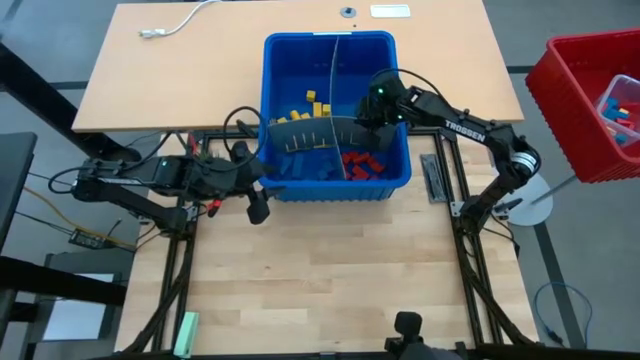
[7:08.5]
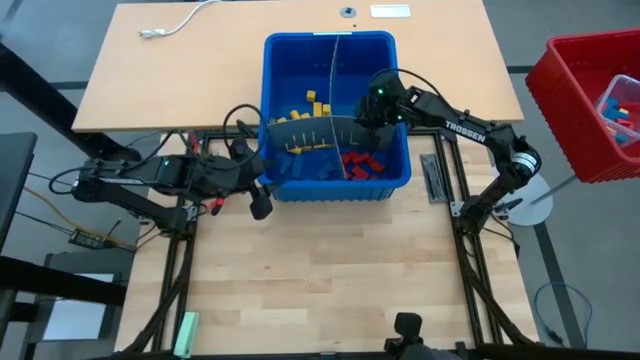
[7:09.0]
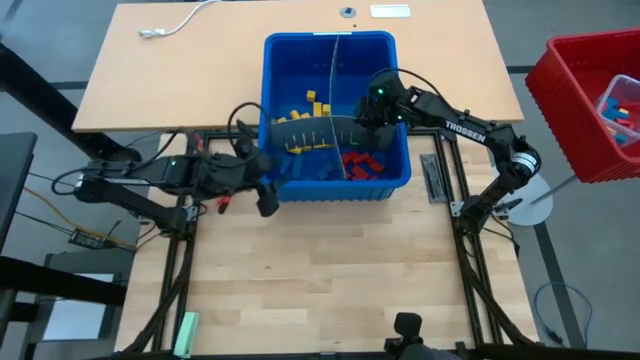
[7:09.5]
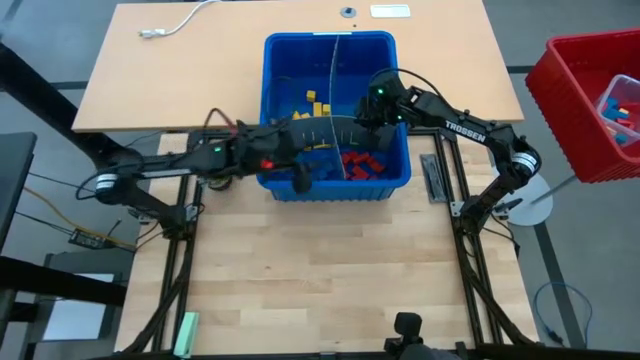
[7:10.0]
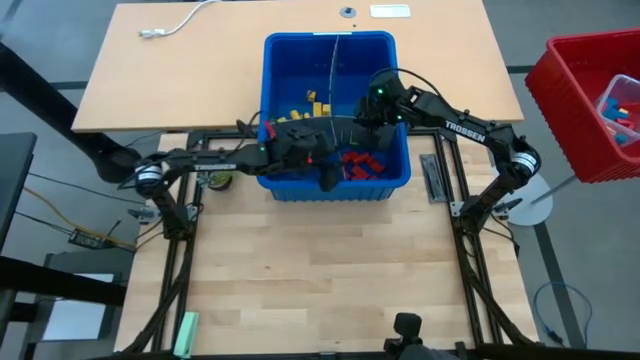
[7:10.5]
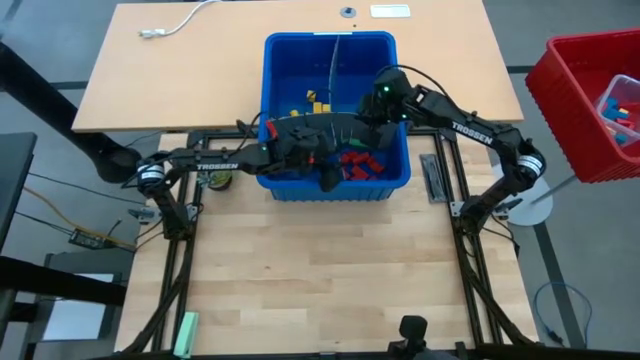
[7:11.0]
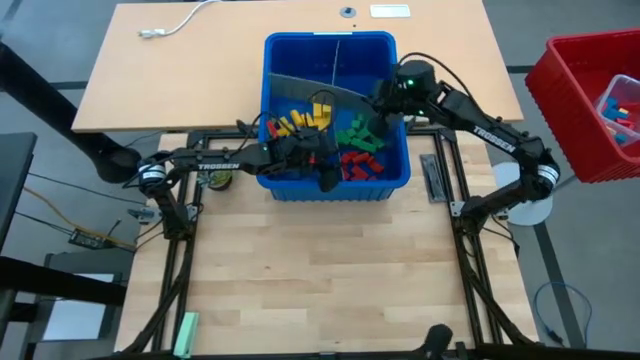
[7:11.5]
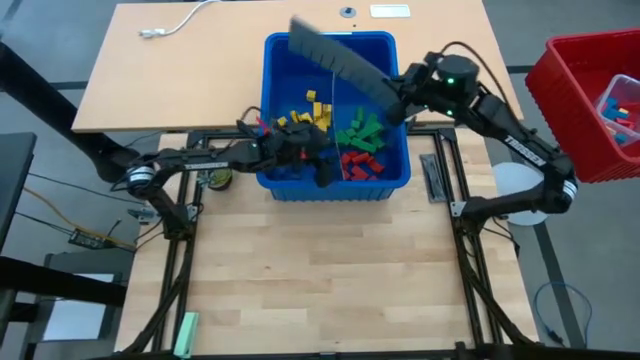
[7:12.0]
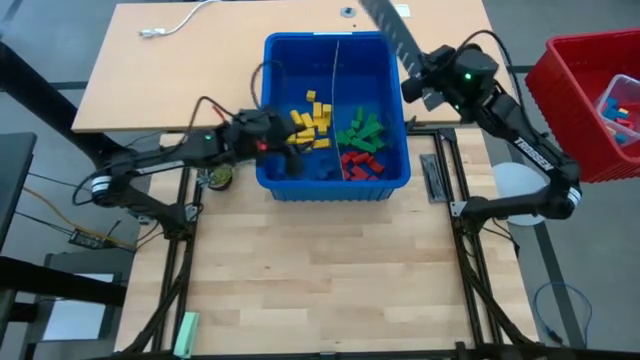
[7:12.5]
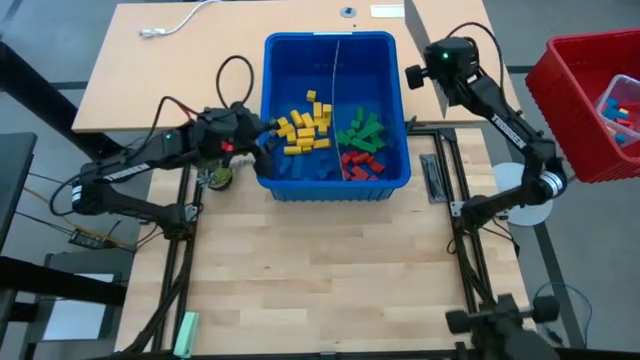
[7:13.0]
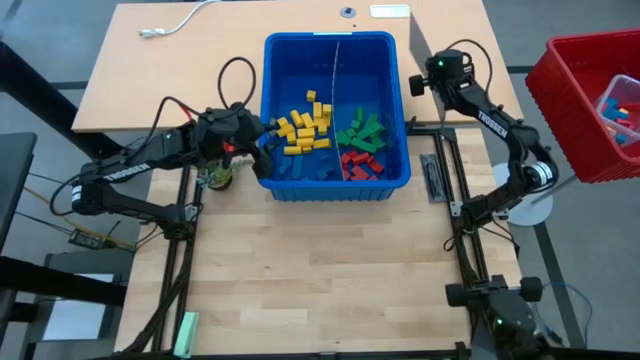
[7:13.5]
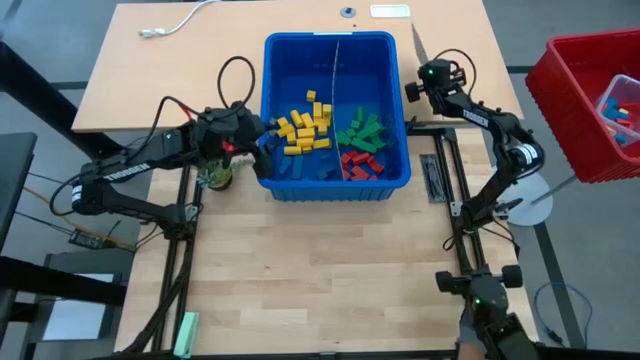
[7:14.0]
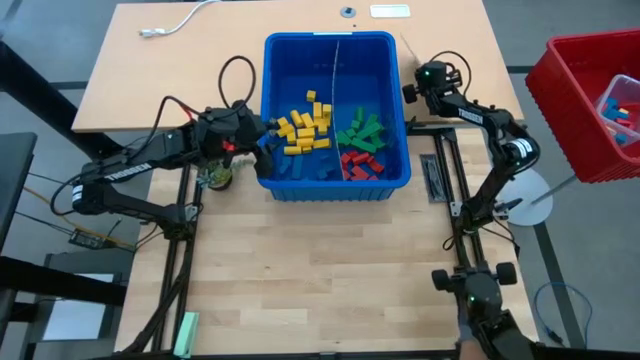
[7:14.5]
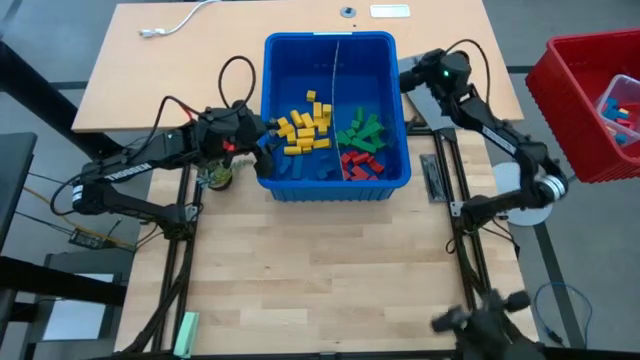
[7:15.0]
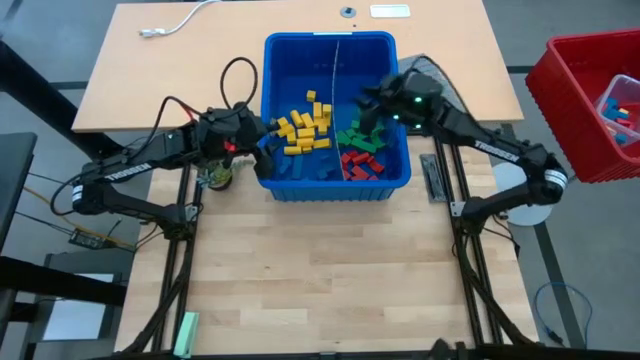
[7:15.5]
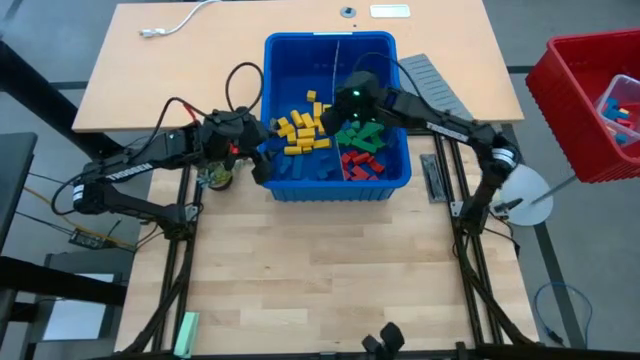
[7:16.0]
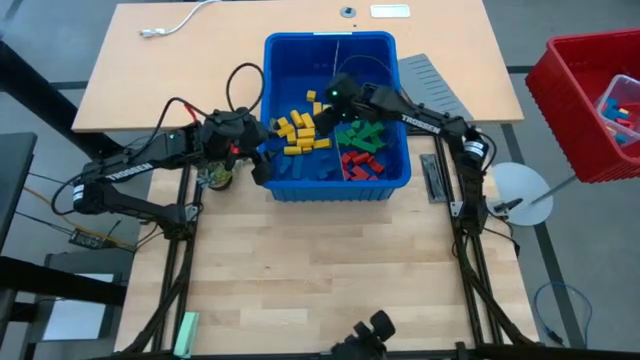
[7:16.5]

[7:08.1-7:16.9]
Task: Sort blocks
Remove the bin divider from the blue bin

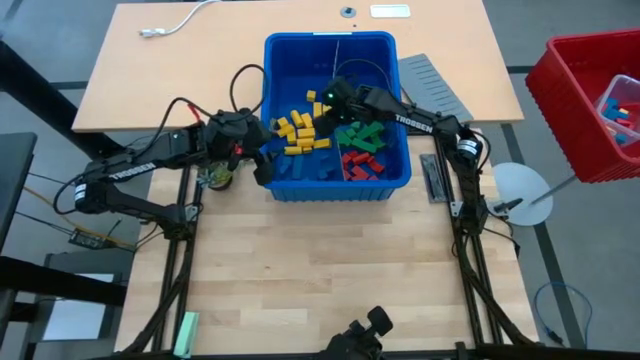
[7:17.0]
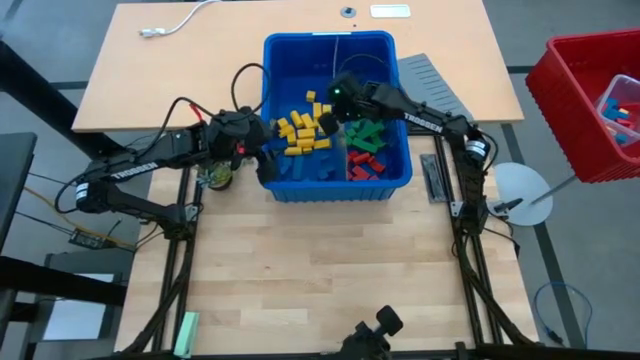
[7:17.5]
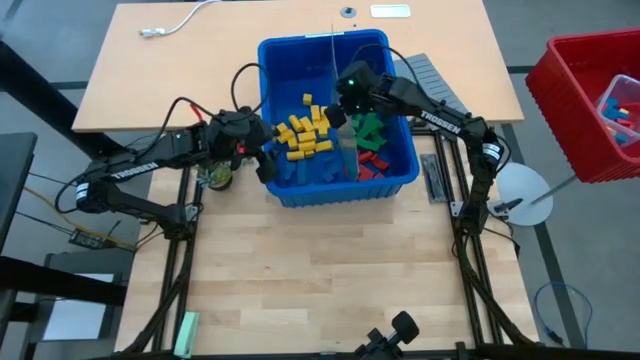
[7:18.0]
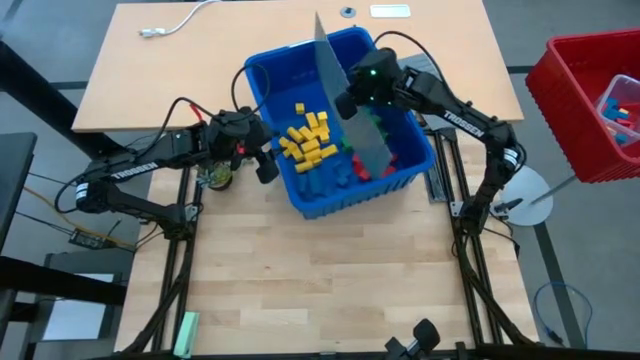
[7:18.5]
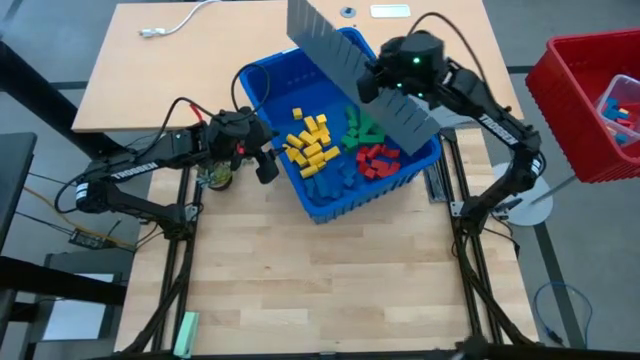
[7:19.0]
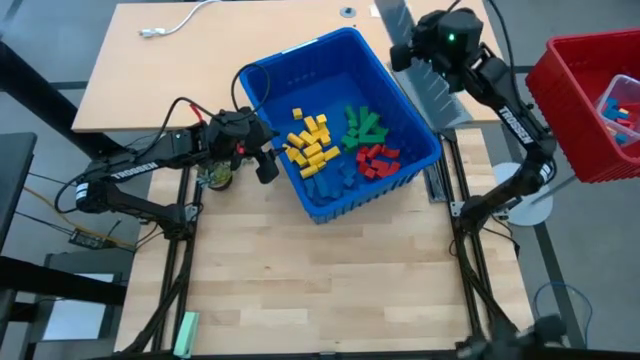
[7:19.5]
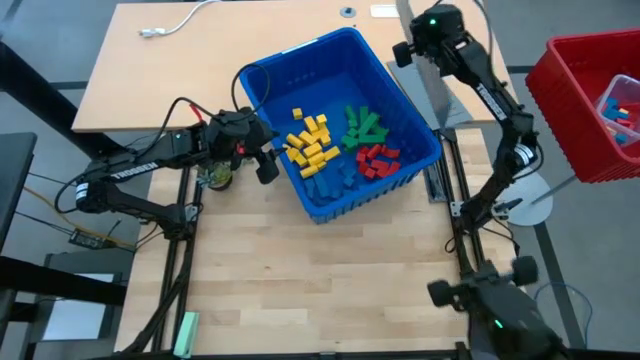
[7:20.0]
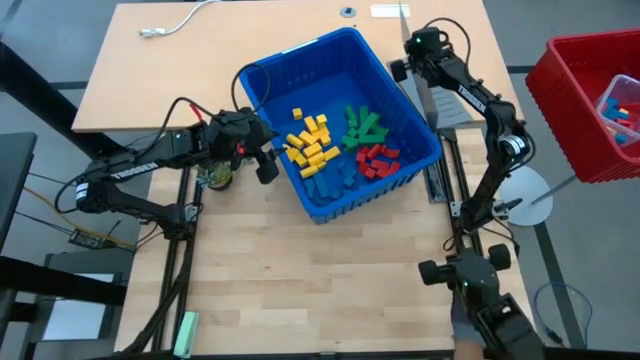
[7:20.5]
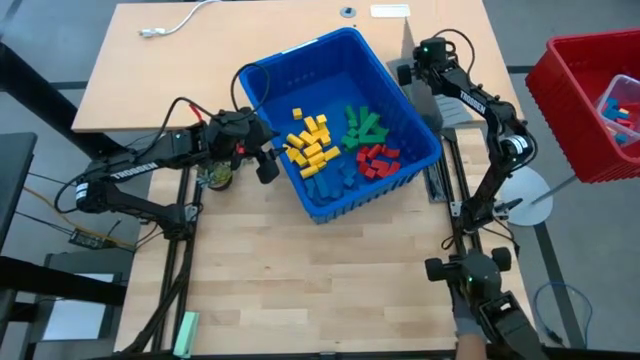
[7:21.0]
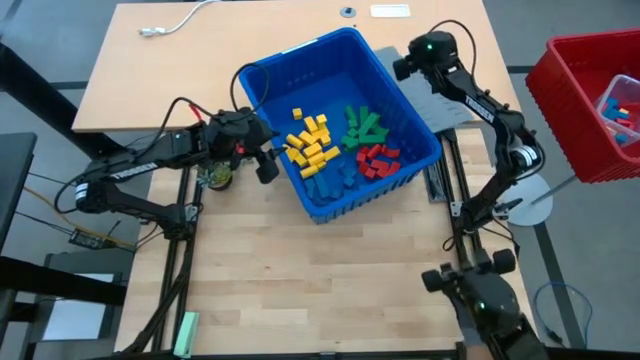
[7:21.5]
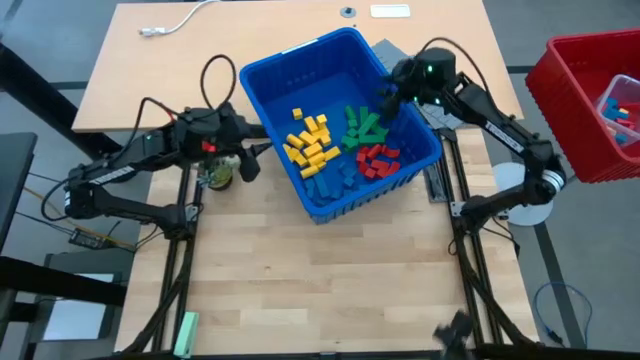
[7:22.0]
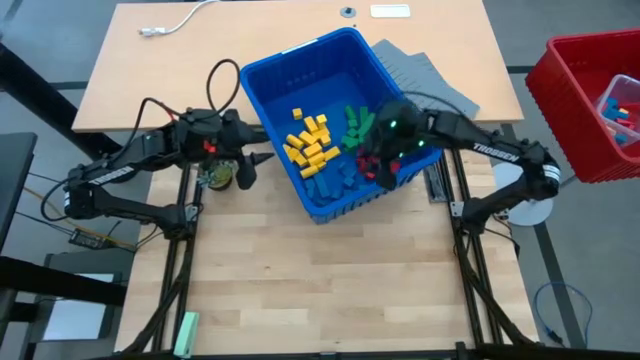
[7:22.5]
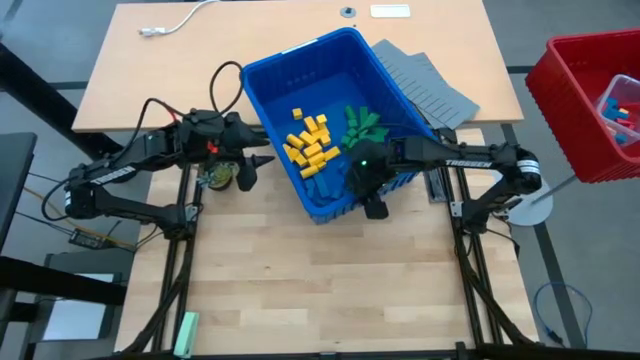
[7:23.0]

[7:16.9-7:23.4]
Remove the bin divider from the blue bin
